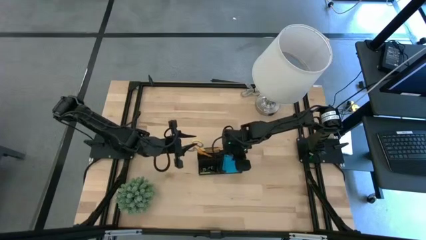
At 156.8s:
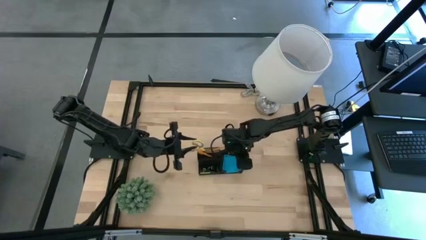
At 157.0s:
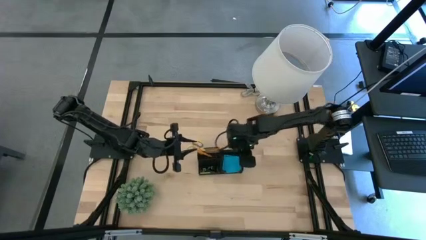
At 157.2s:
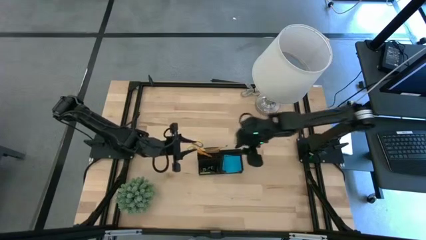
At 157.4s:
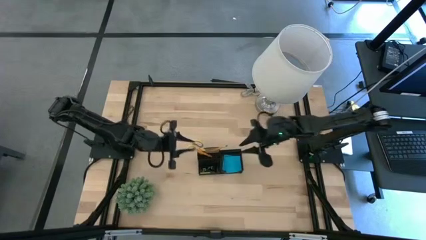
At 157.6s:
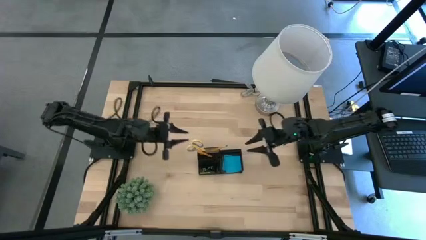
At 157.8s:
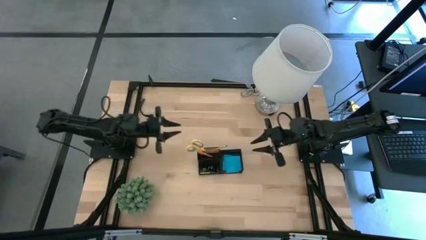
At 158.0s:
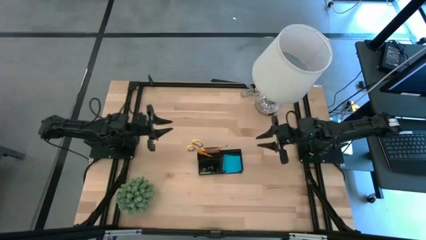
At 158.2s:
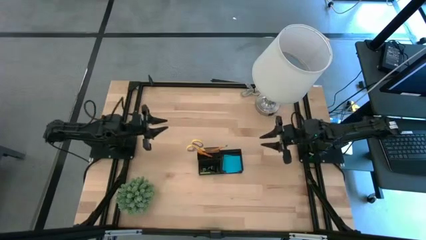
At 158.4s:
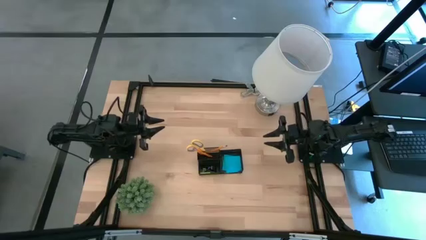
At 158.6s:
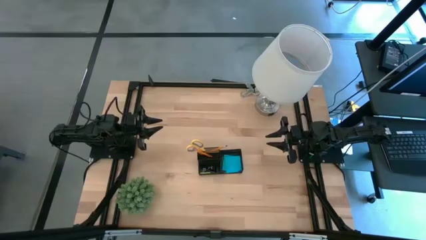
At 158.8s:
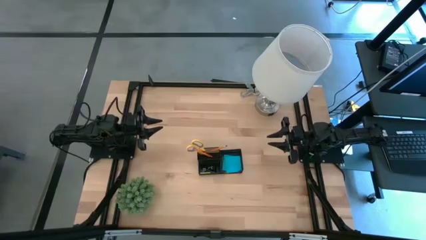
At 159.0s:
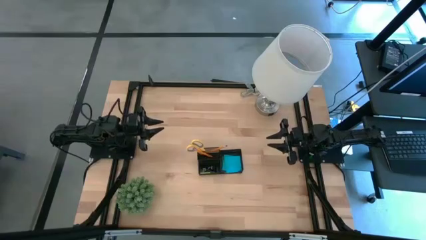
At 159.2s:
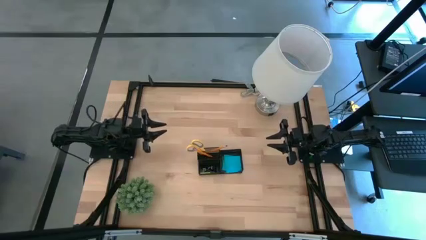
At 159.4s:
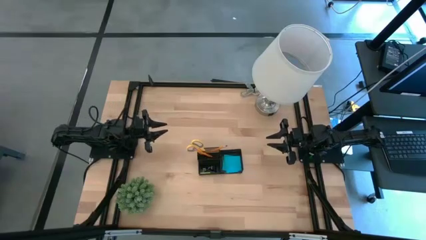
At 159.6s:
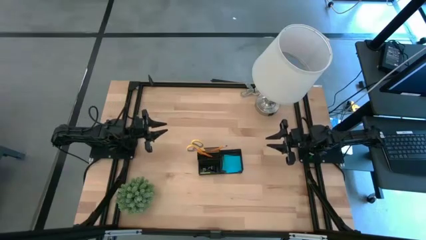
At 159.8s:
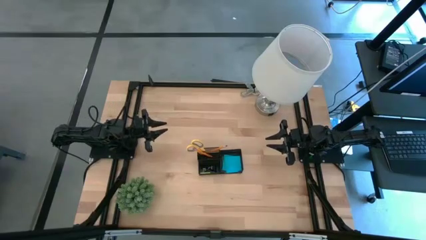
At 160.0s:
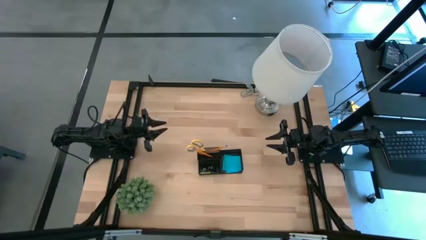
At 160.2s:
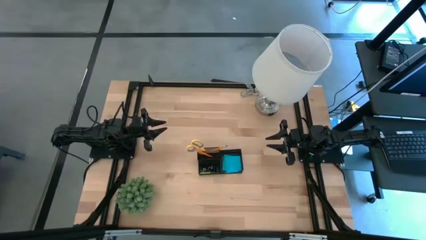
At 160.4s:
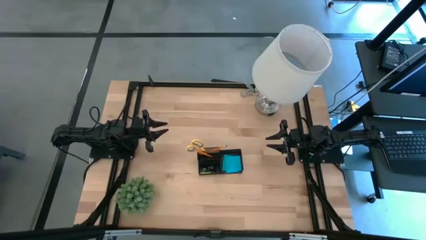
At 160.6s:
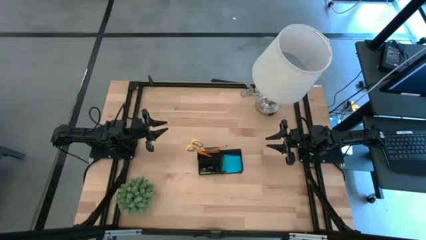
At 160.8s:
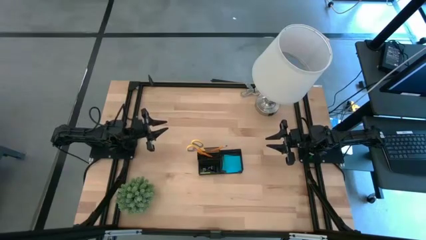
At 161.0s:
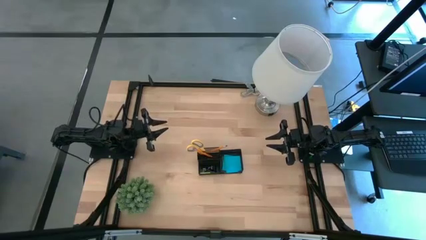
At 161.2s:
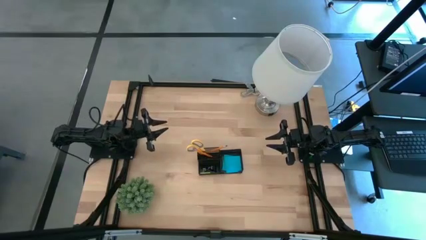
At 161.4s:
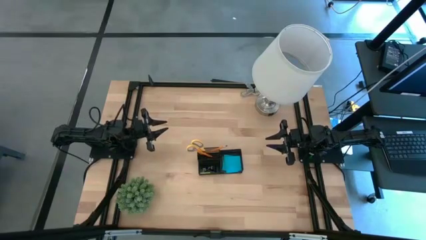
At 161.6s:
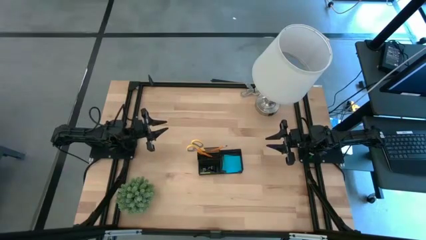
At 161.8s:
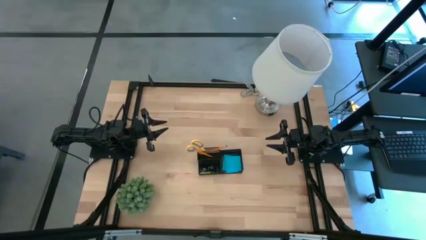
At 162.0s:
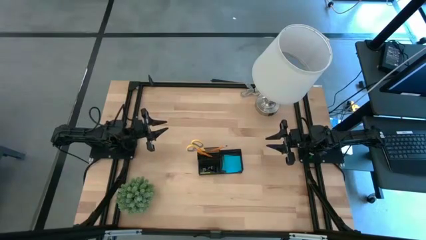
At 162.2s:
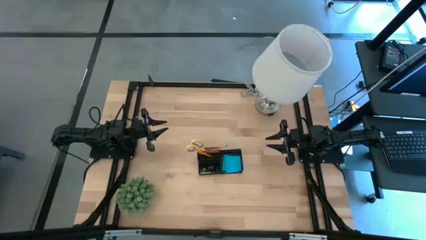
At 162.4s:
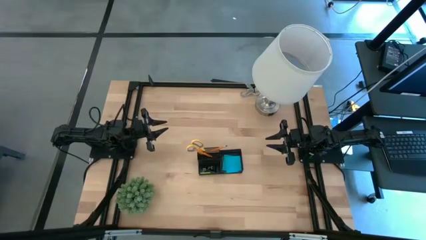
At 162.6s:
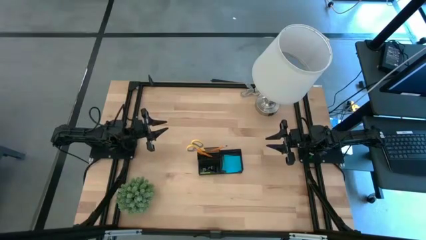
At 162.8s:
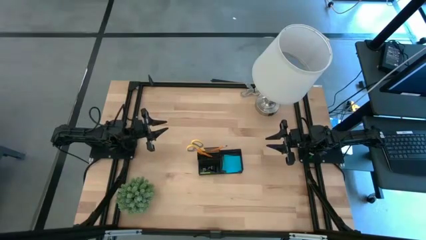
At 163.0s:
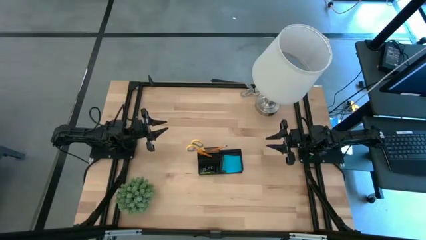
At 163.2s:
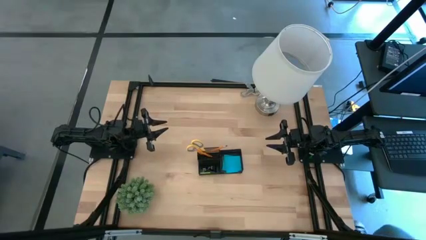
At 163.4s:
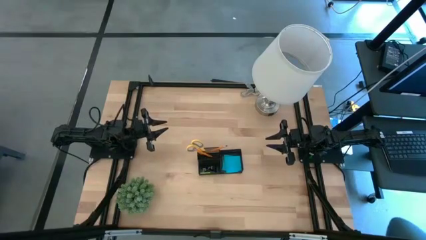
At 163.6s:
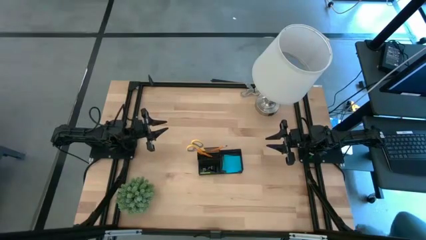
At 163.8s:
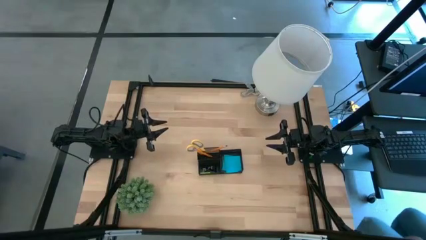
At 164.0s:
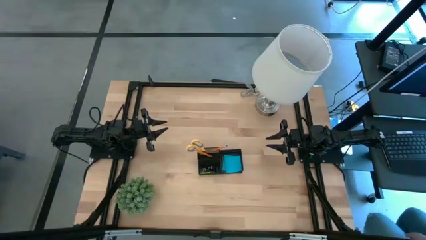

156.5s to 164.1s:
Task: Pick and place office supplies into organizer
Return to Home Position

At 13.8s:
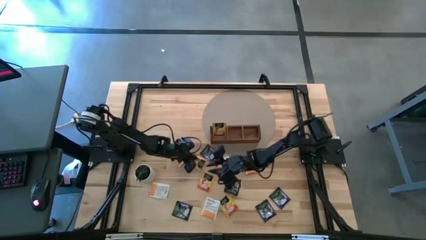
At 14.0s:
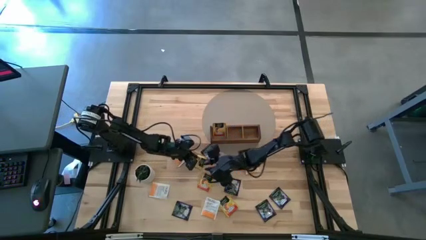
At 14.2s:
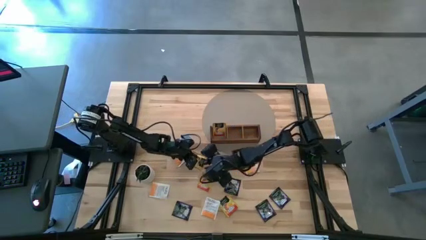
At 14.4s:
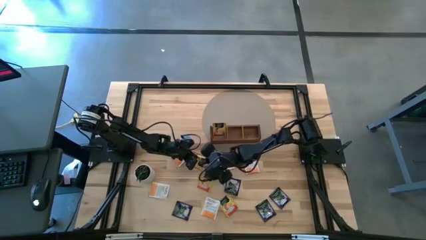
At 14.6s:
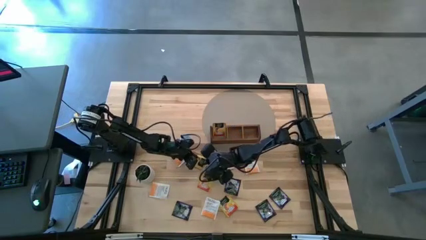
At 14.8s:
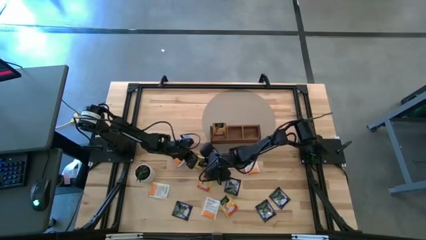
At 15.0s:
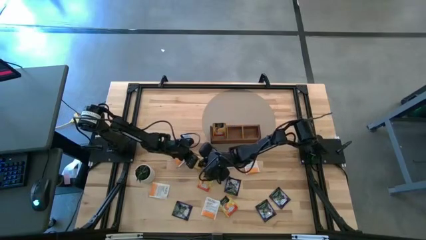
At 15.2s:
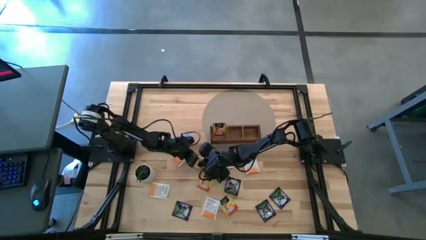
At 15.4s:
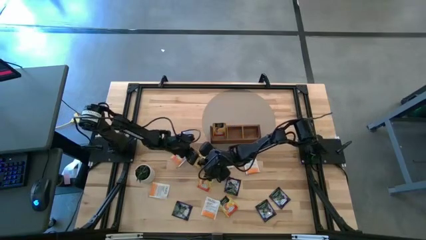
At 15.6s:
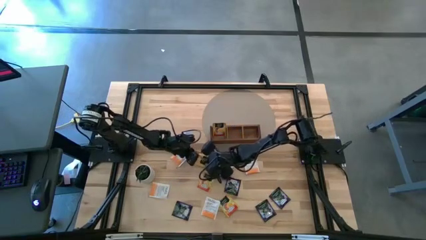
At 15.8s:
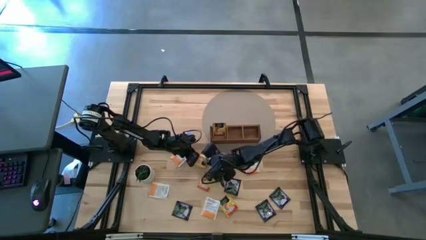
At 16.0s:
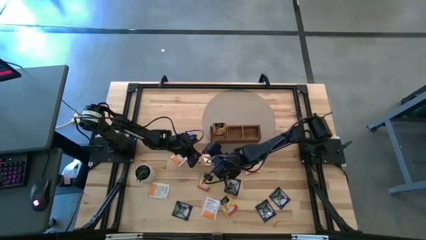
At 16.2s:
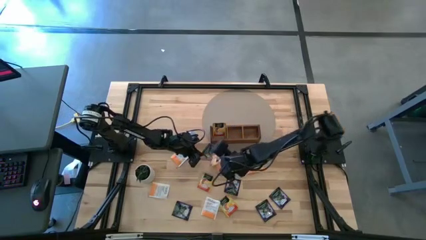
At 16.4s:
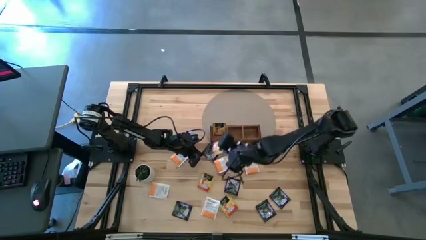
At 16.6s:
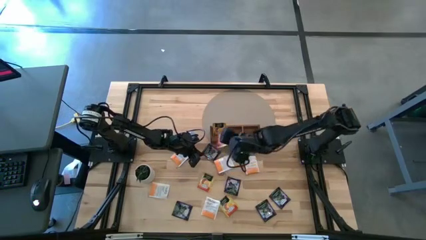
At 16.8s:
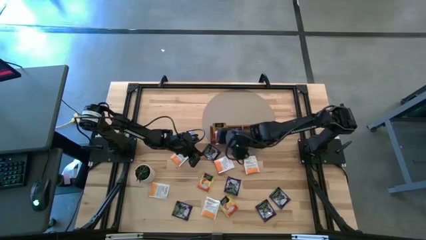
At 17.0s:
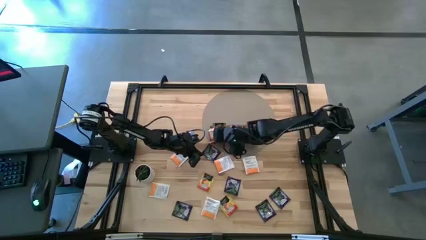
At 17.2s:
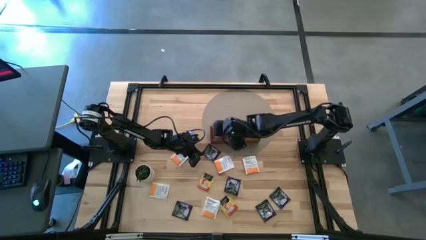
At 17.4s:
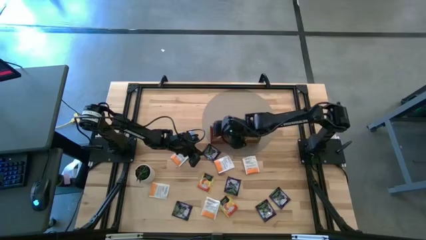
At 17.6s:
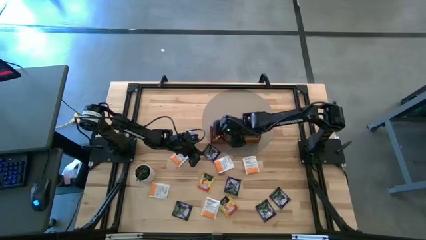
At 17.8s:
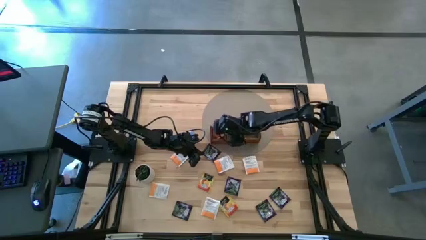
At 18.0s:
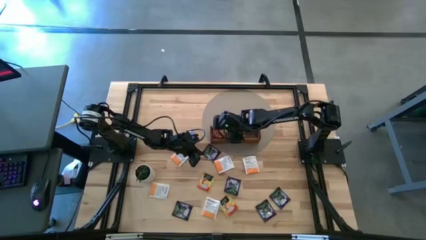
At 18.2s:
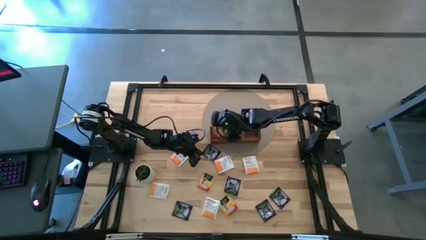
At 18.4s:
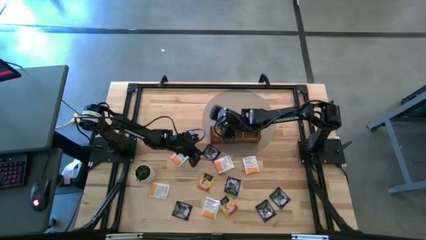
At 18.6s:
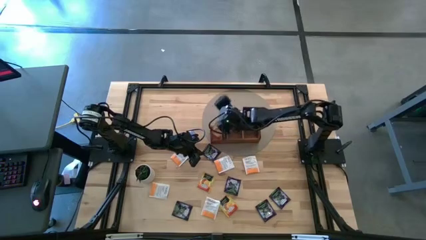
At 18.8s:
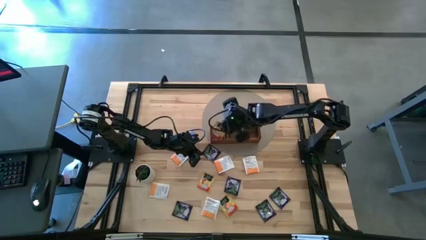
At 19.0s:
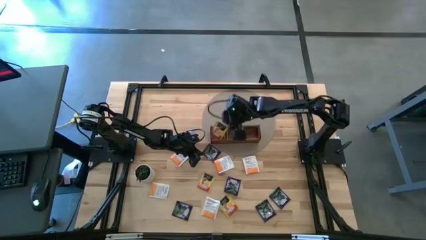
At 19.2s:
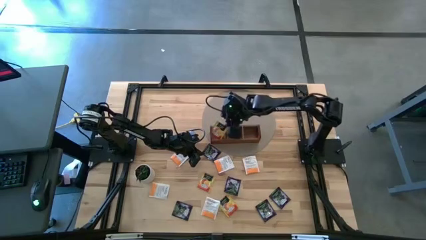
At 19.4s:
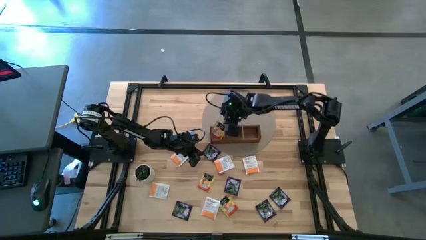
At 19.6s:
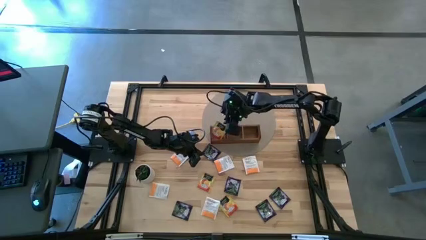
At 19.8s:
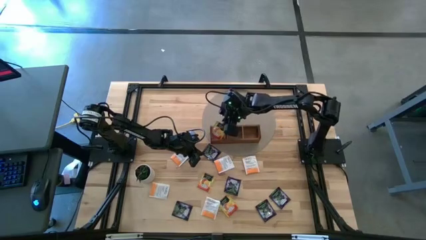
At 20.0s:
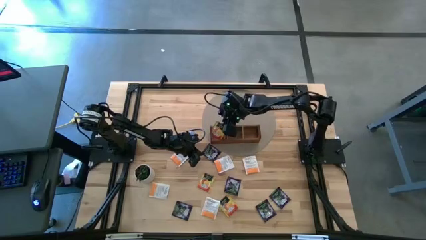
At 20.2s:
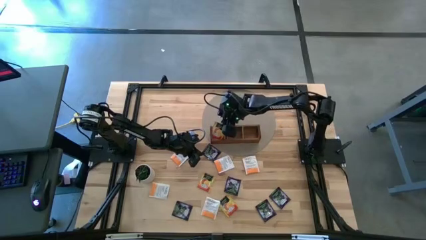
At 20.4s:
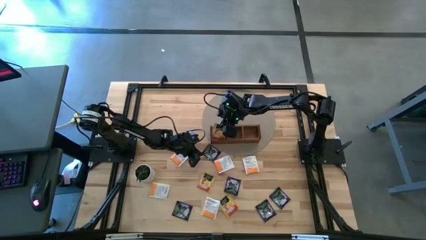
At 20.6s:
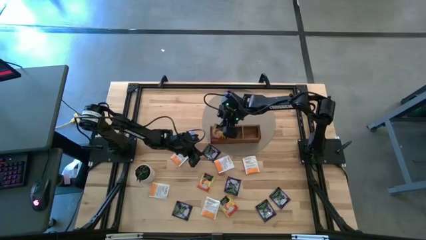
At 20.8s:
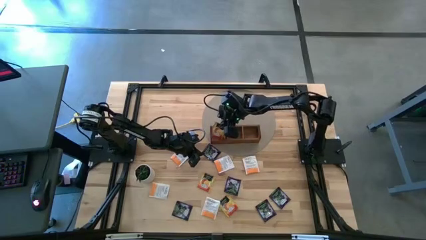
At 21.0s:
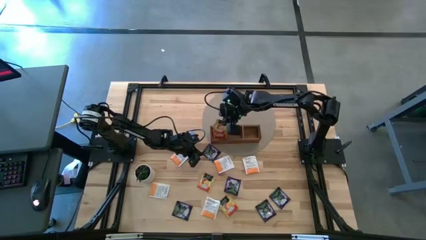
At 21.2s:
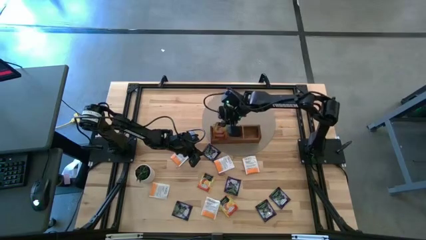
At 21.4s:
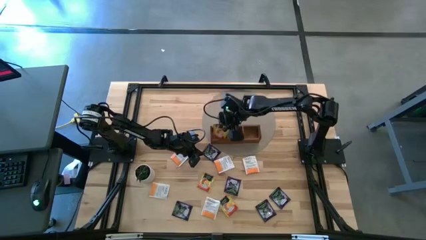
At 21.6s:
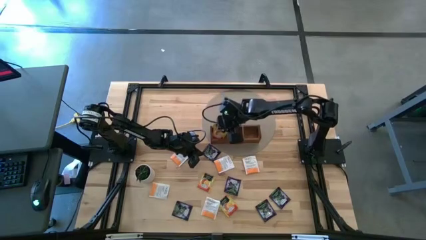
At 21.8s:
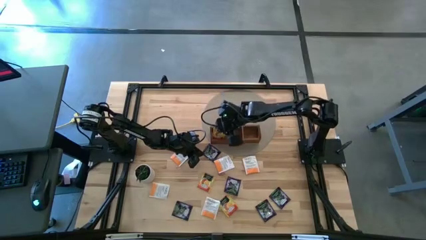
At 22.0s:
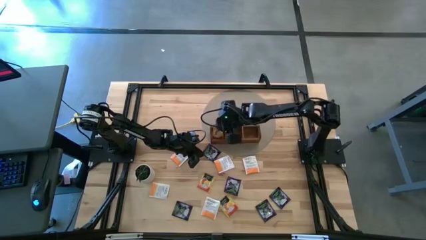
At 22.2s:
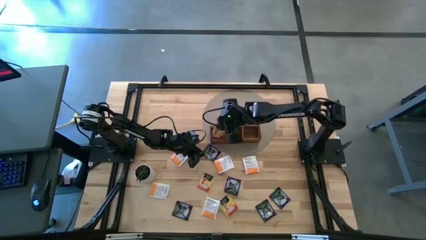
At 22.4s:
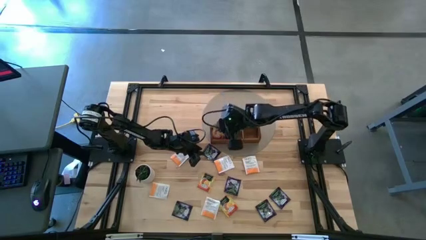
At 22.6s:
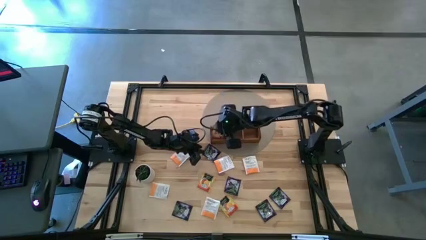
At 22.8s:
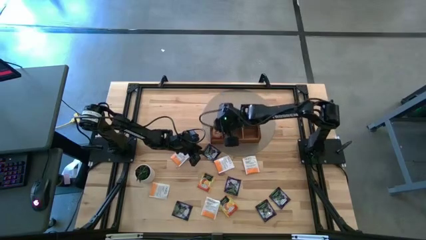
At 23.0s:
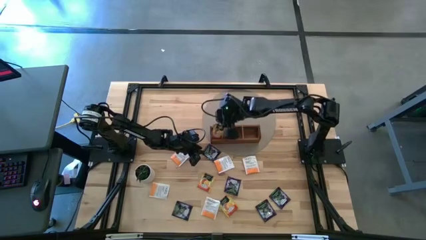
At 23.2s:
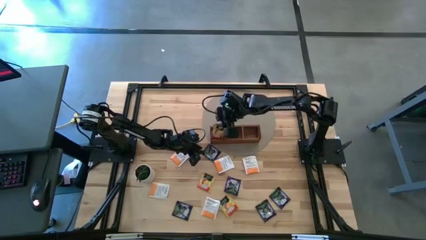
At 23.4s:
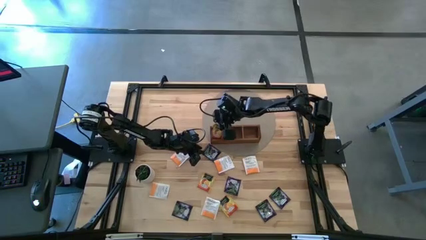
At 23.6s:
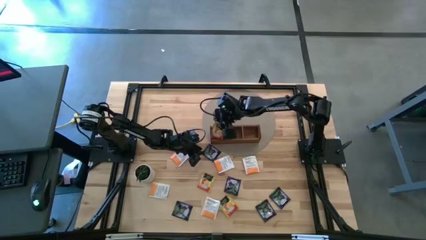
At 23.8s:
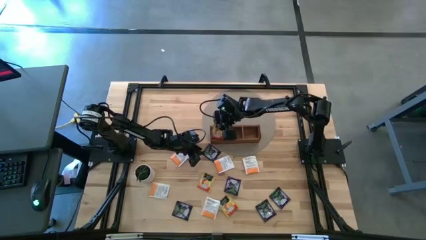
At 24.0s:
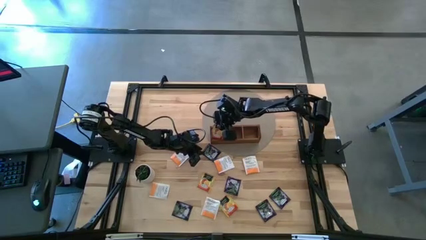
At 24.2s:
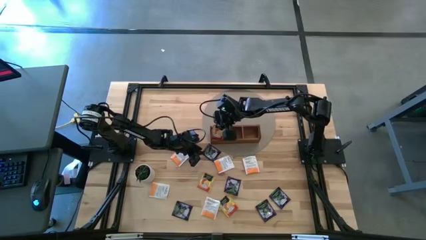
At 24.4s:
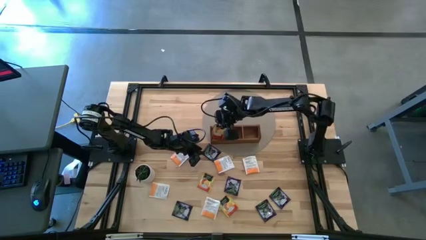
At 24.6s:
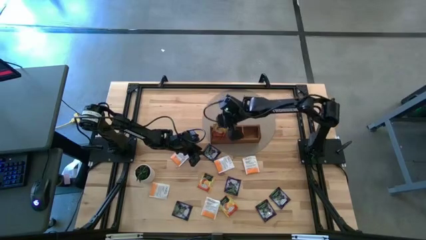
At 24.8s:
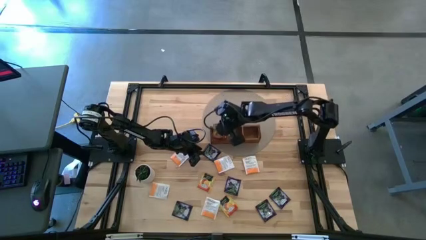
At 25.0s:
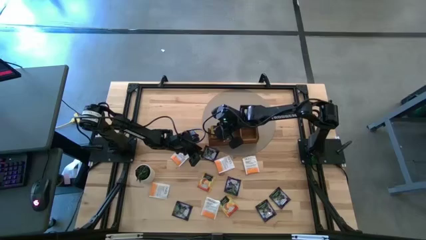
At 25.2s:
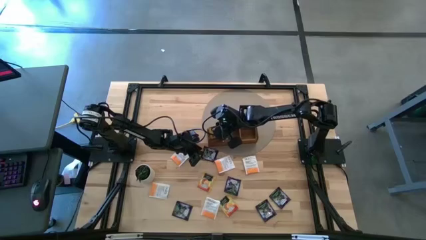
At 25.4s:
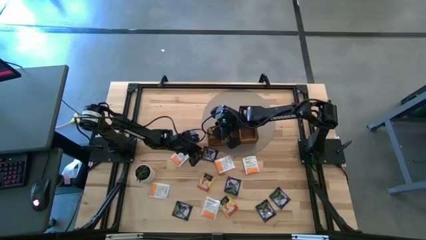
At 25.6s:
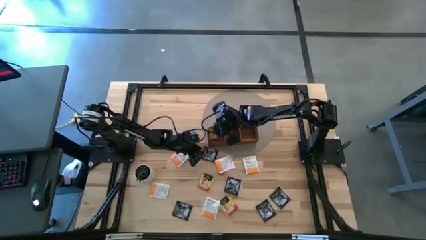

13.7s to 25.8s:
Task: Pick & Place Tea
Put the yellow tea bag into the left section of the wooden organizer
